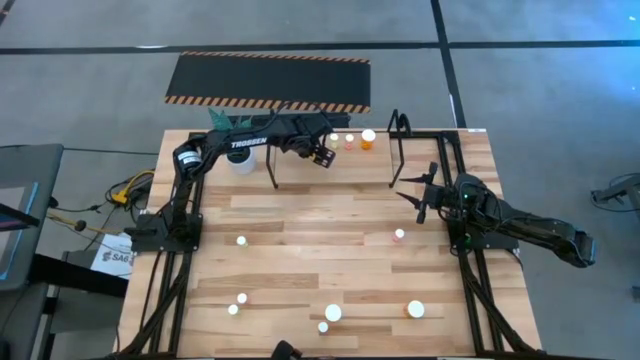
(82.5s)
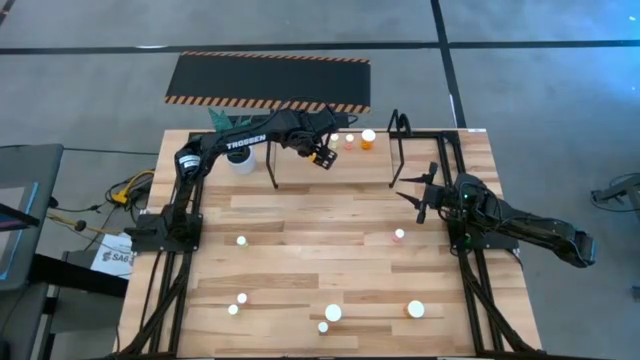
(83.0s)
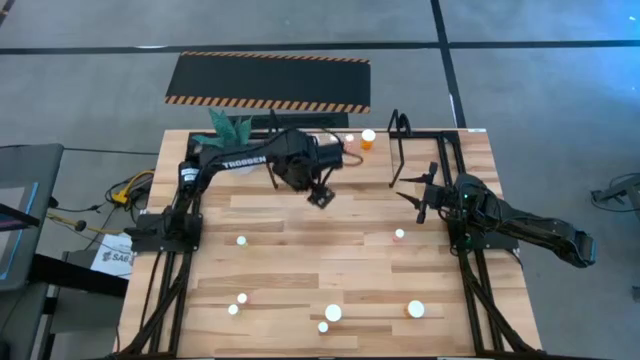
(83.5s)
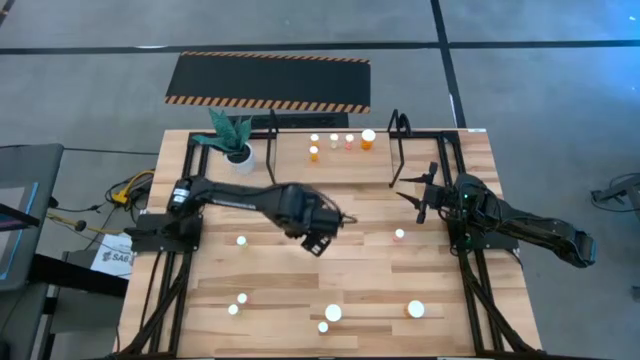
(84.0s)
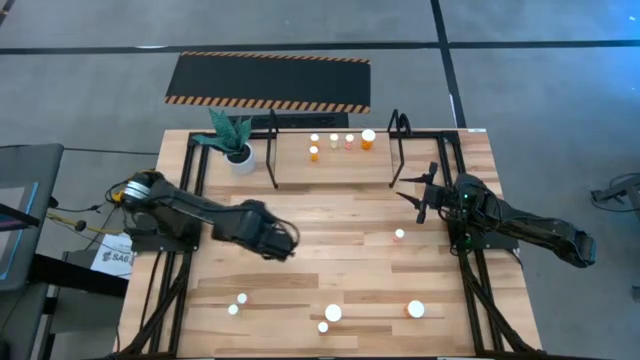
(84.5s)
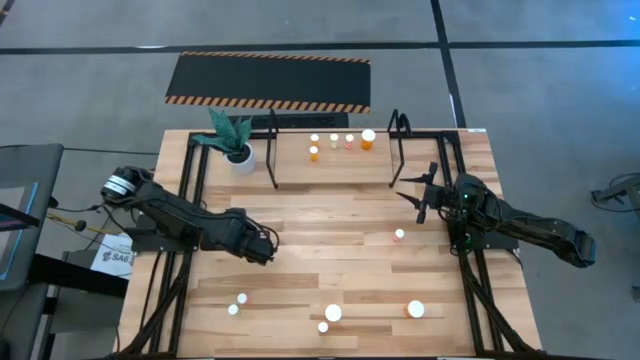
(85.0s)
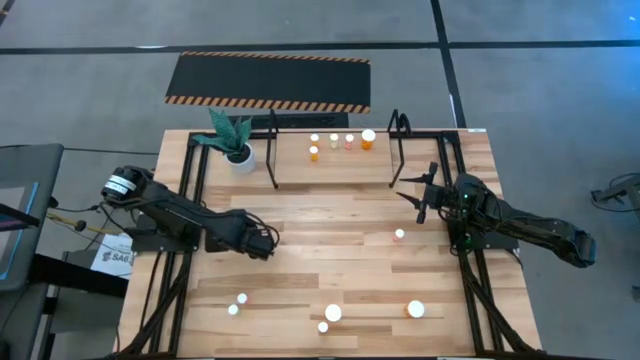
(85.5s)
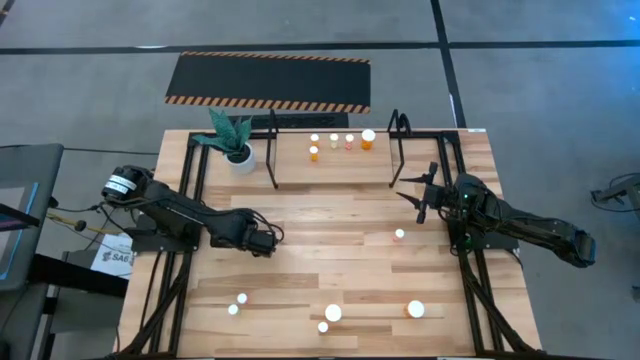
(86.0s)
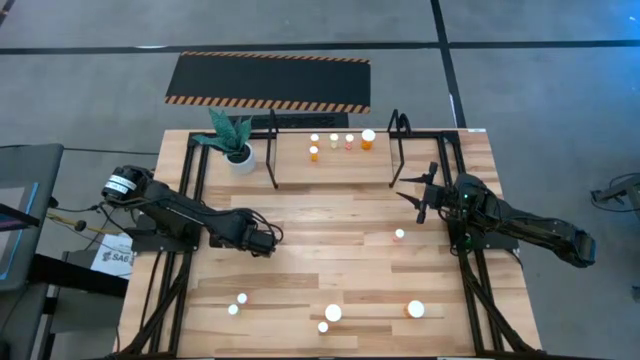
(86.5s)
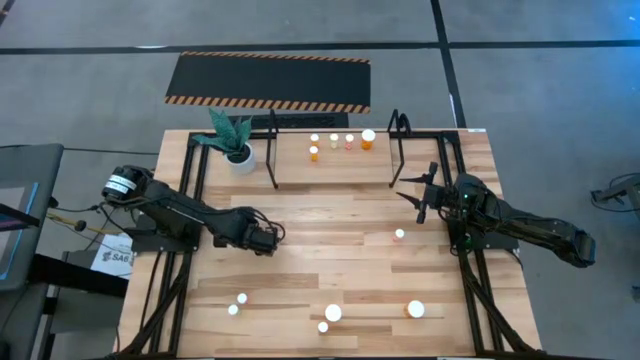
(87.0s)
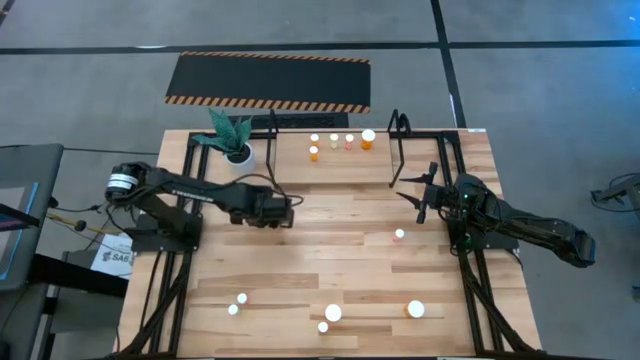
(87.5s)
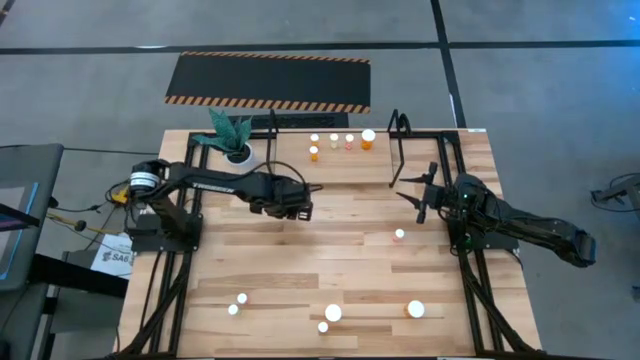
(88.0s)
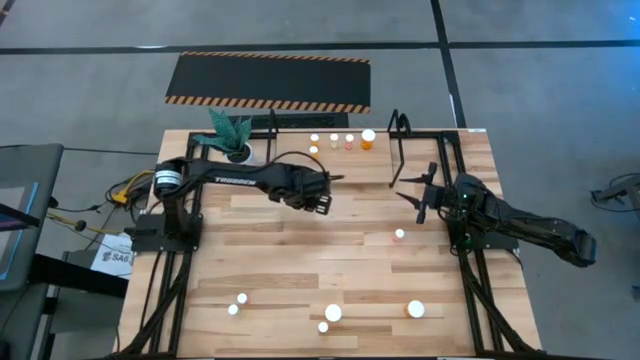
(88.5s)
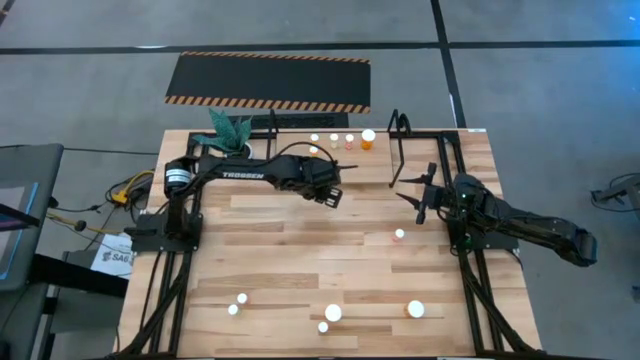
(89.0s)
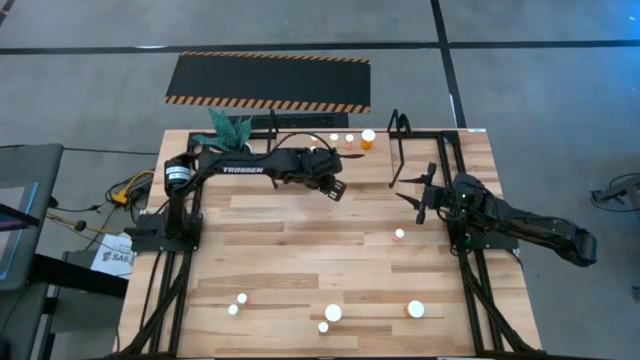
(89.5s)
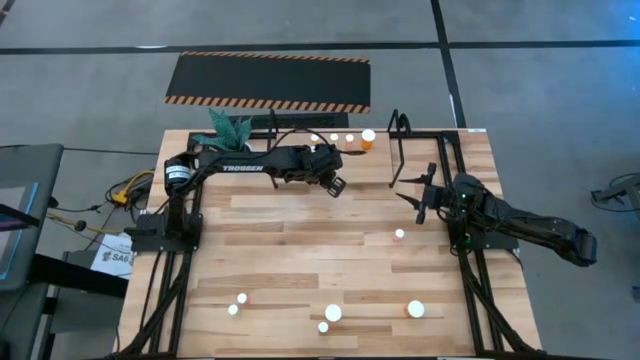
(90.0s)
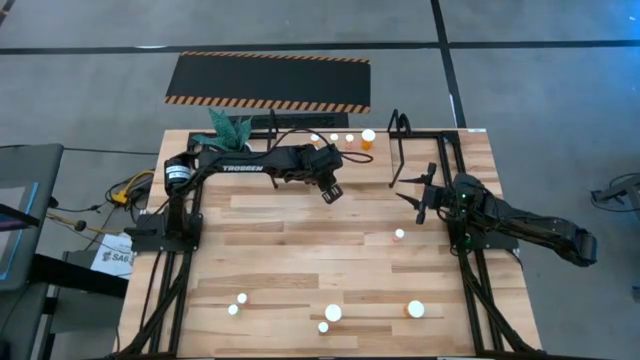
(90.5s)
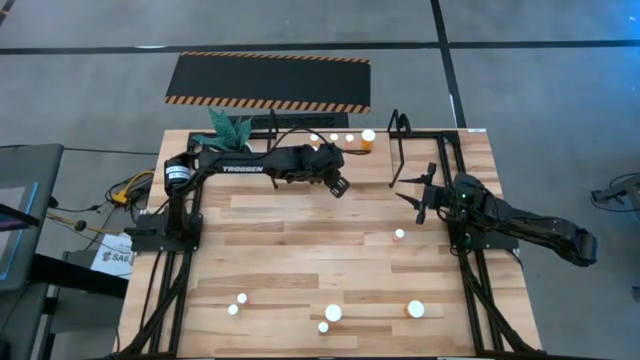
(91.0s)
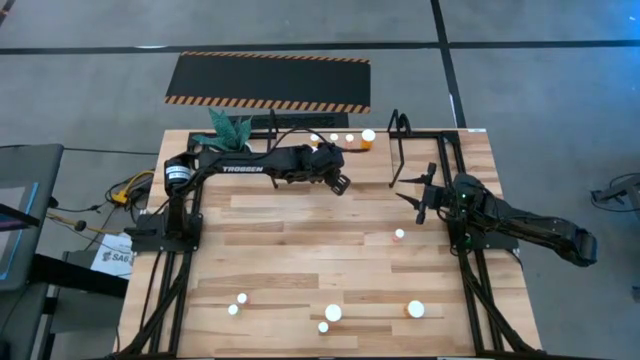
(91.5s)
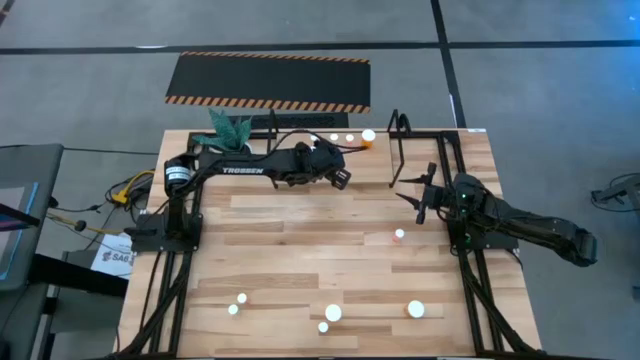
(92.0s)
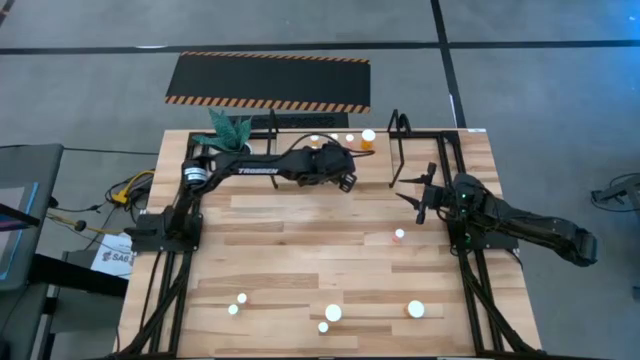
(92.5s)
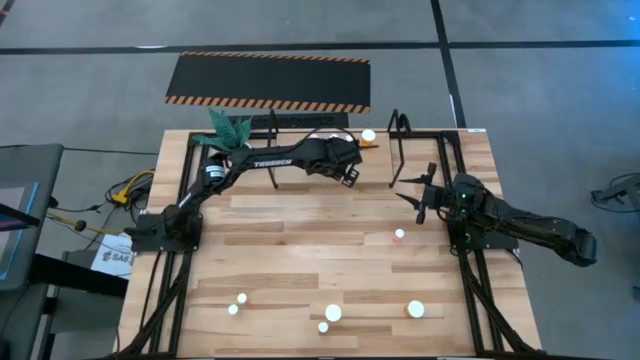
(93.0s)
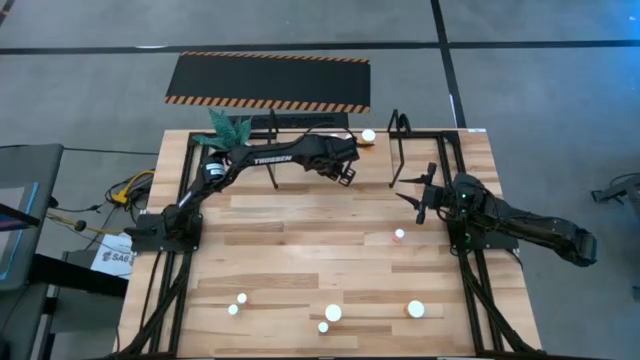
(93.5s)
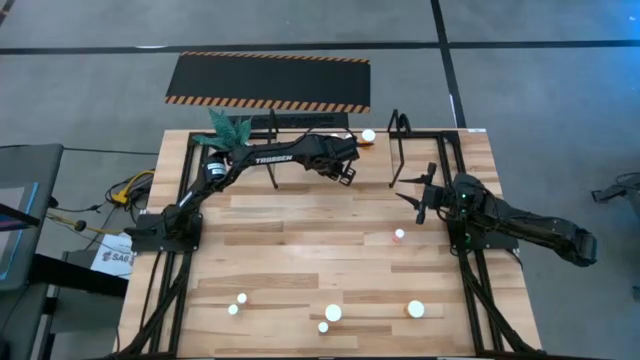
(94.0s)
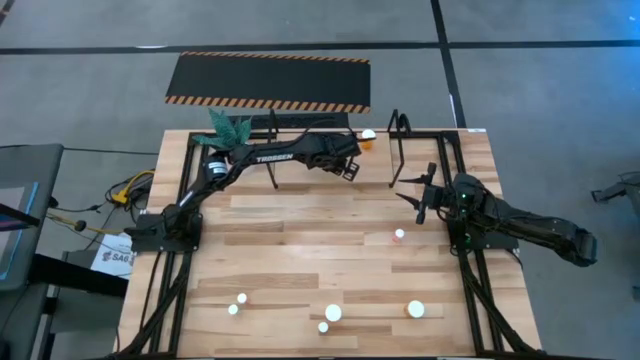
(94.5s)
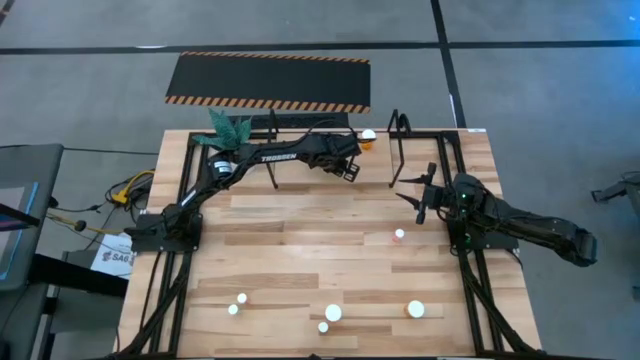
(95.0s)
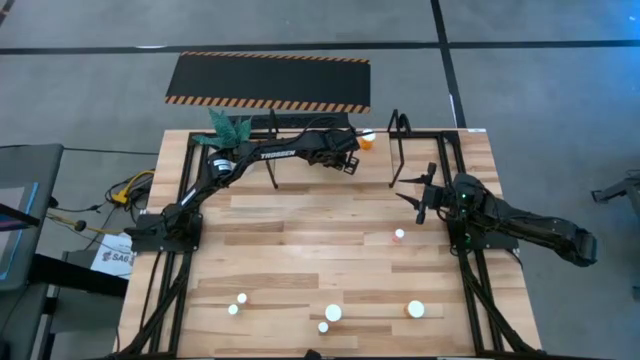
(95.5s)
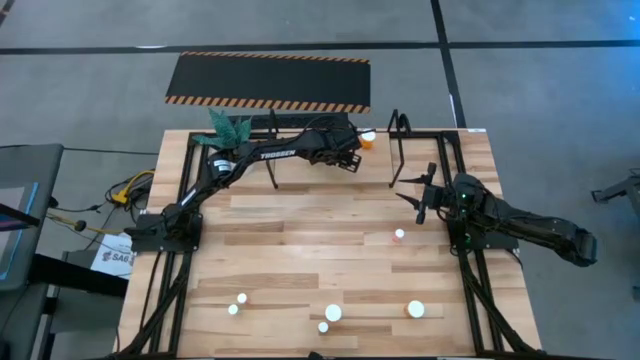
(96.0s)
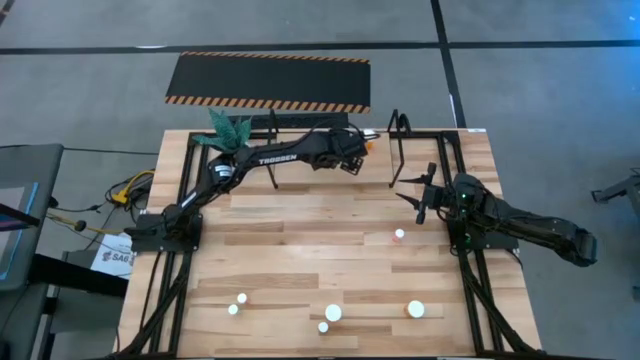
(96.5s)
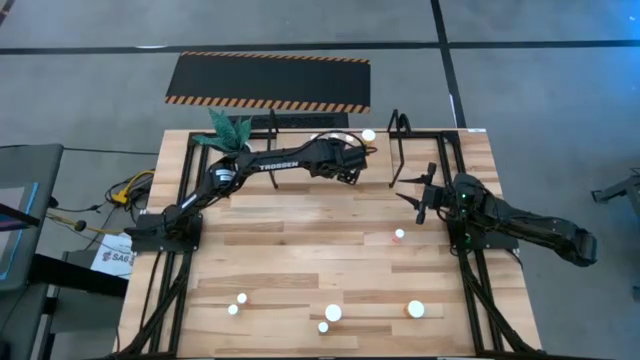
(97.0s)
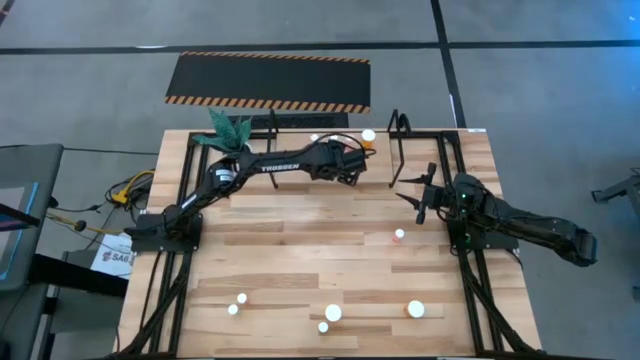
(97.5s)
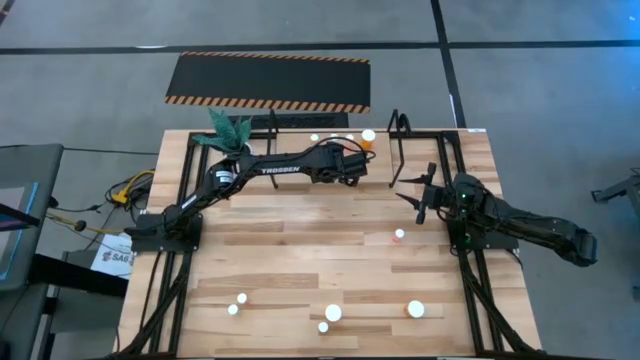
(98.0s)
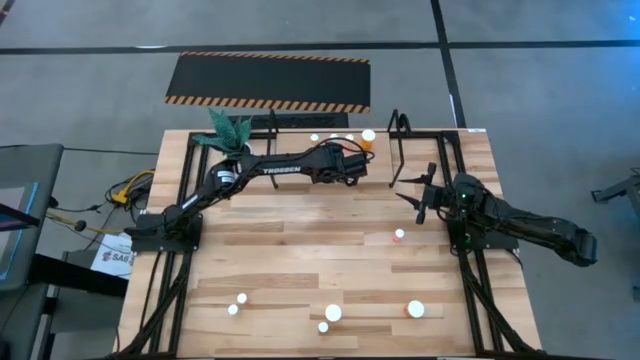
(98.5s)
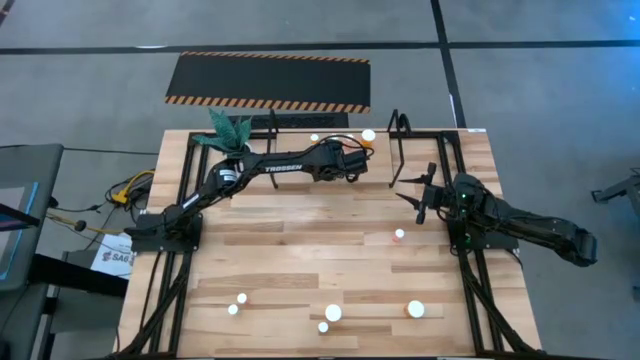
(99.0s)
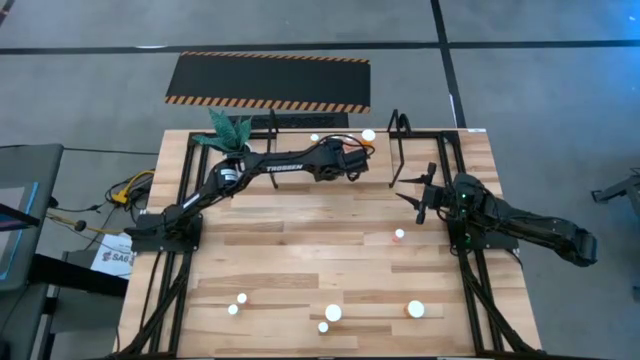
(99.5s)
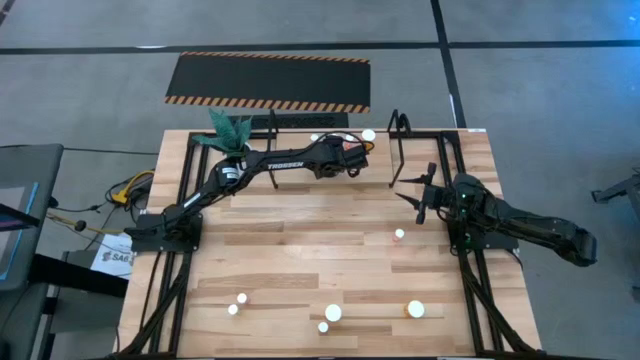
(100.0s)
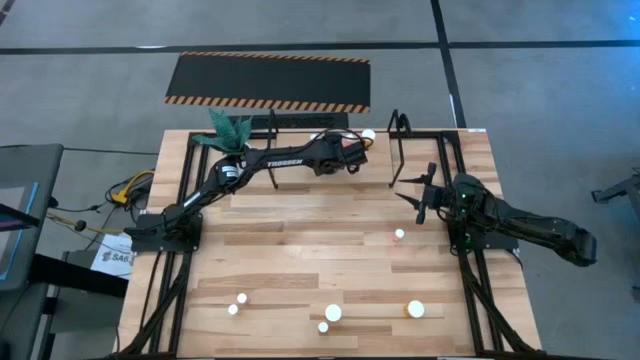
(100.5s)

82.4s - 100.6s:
Task: Pick and place medicine bottles onto shelf by color
Put the top small yellow pill bottle aligned with the other yellow pill bottle on the shelf

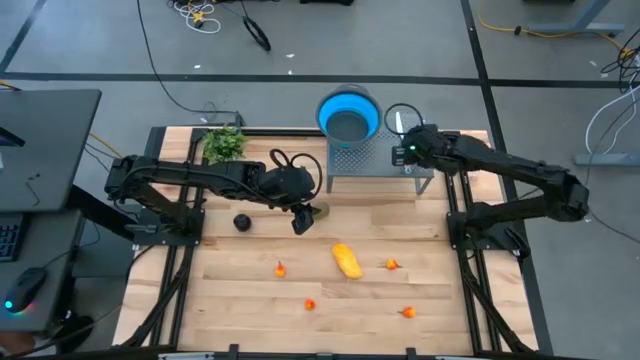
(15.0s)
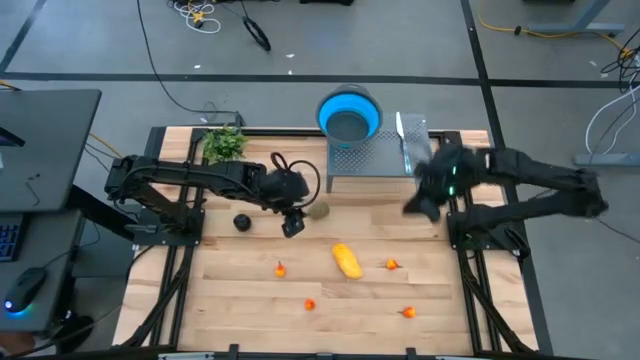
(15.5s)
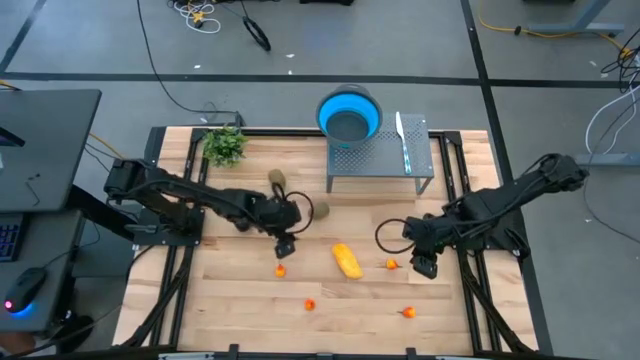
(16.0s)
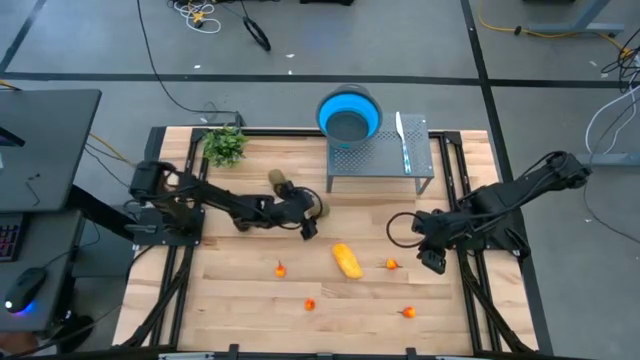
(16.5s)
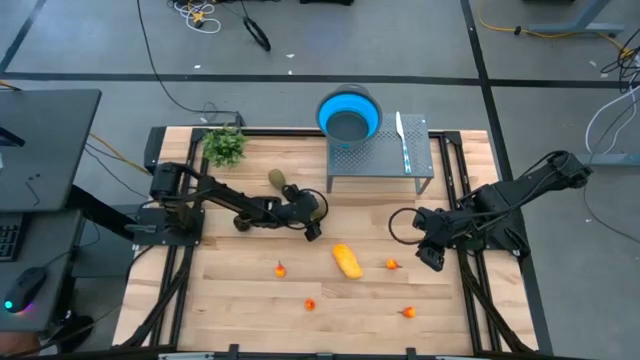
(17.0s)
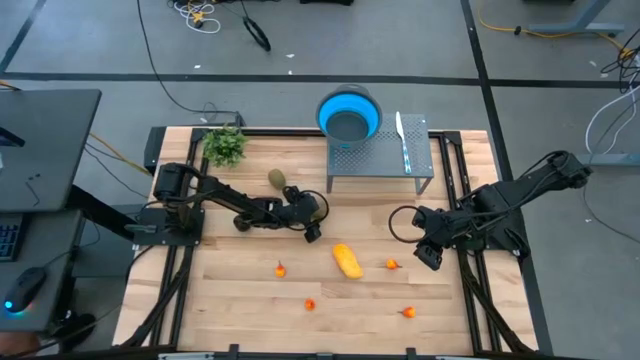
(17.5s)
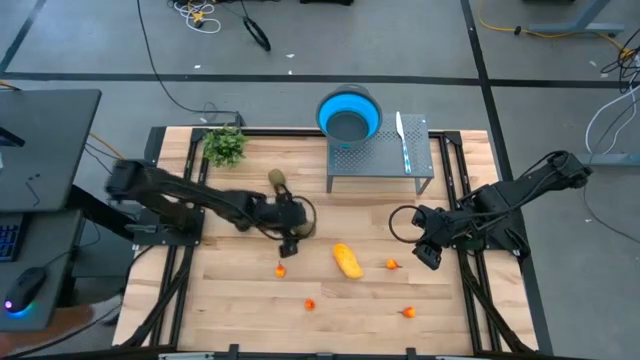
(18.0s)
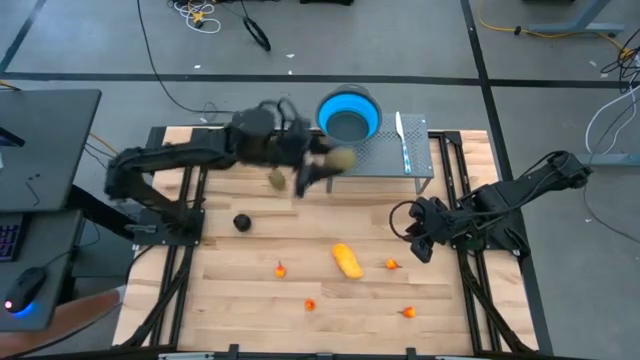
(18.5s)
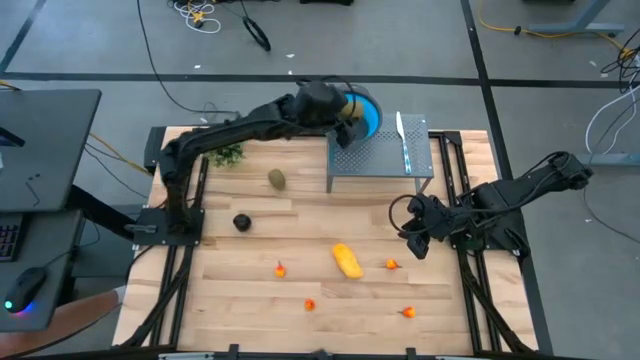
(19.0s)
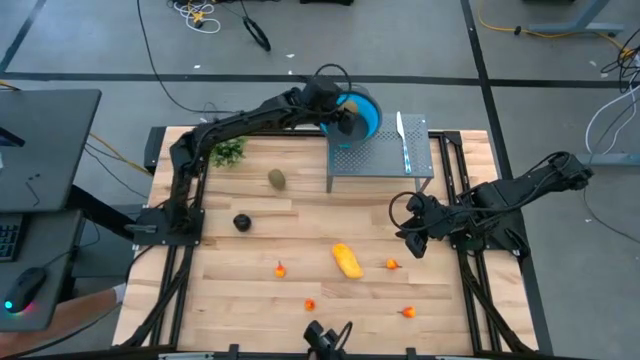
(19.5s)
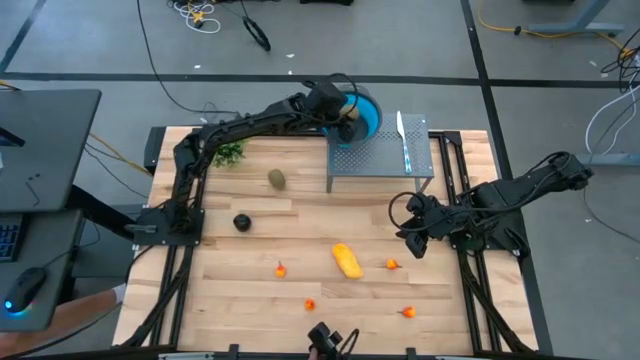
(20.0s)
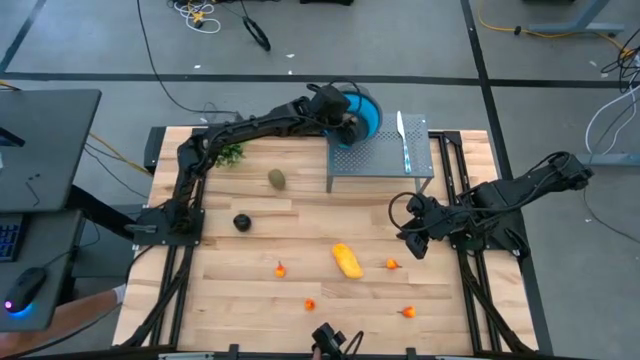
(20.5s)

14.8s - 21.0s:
Task: Pick & Place Fruit
Put the bottom kiwi into the strainer bowl
